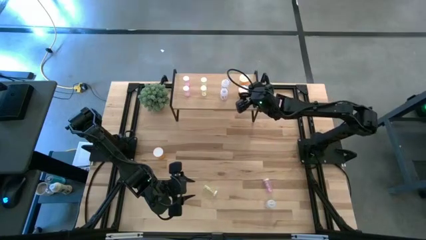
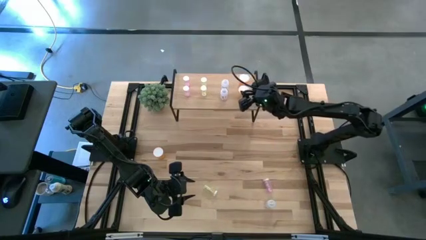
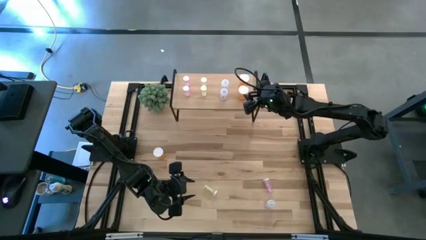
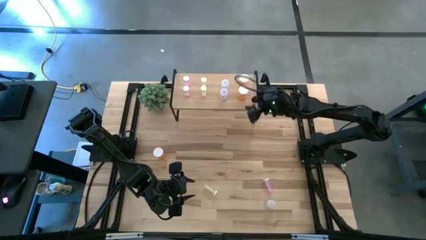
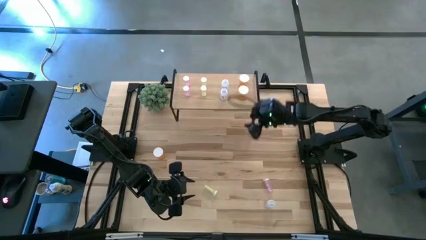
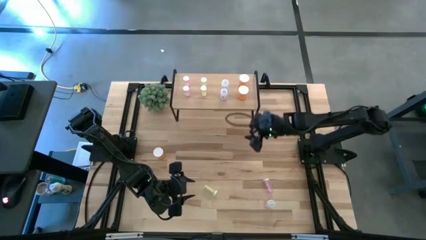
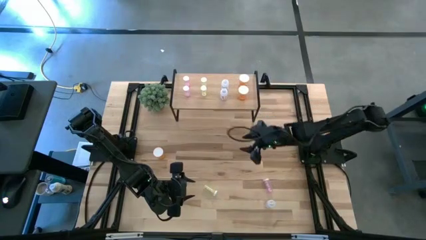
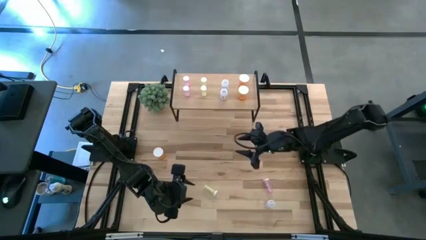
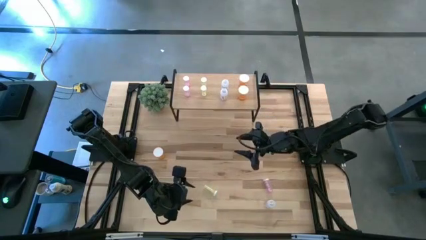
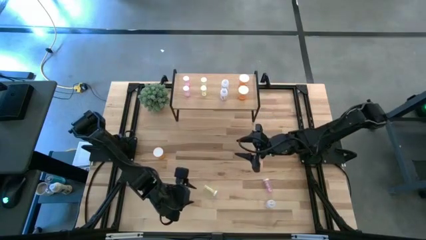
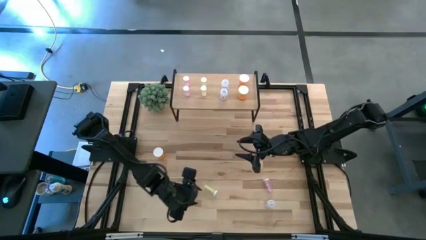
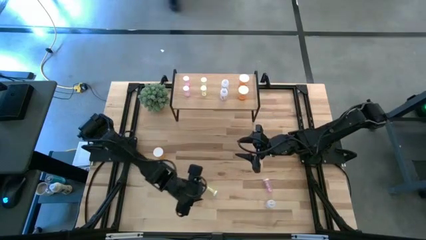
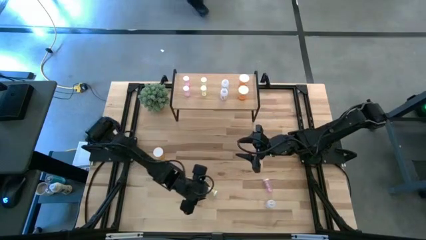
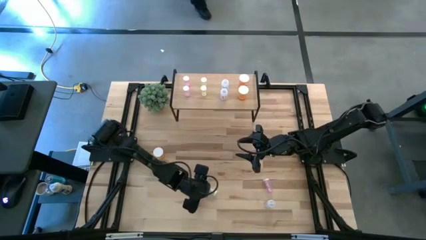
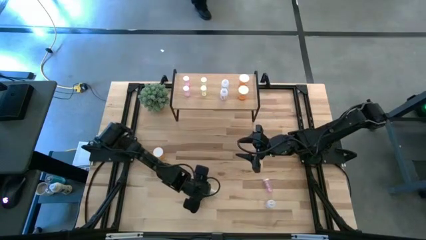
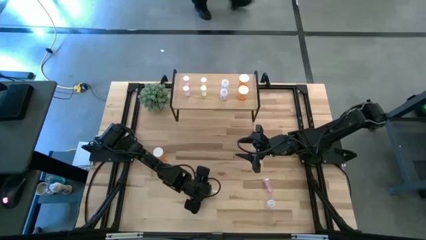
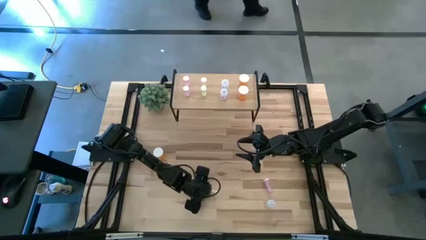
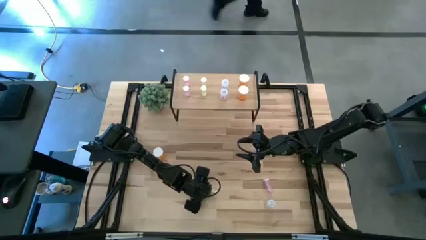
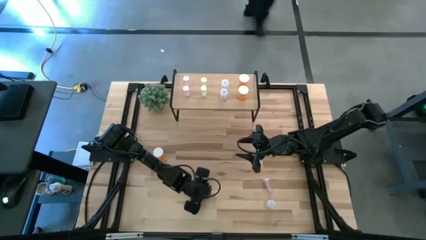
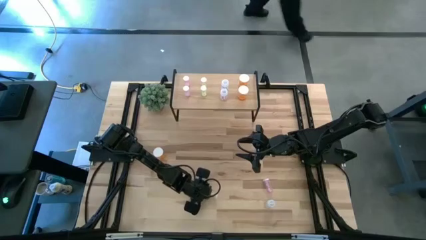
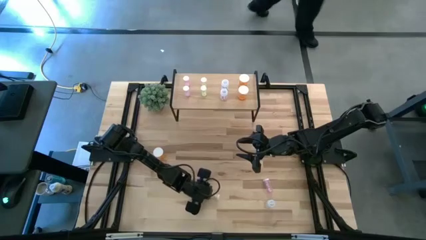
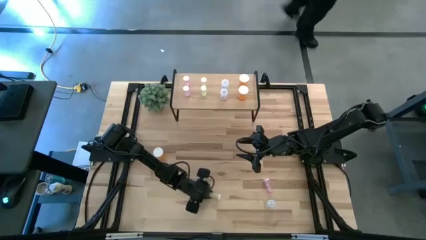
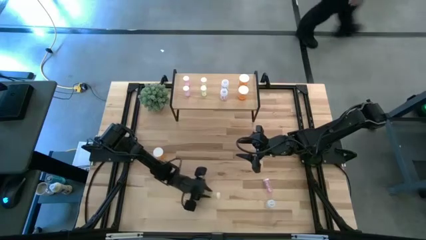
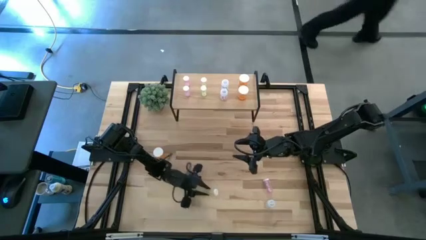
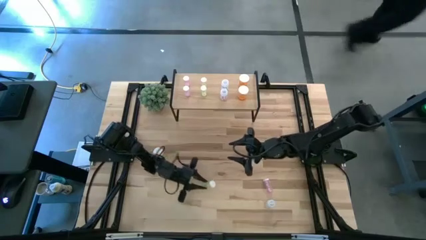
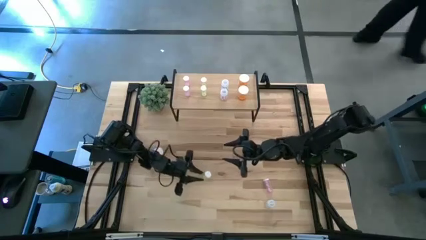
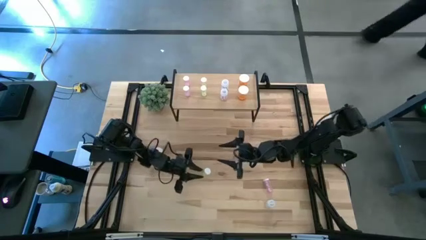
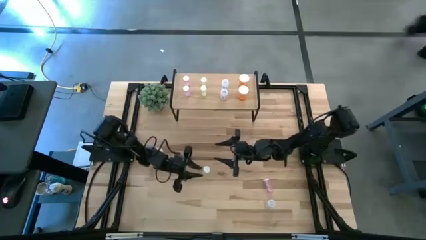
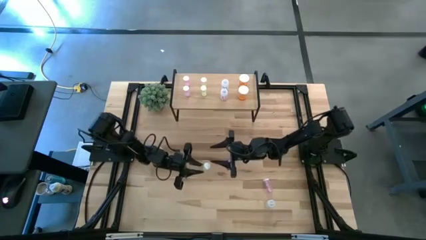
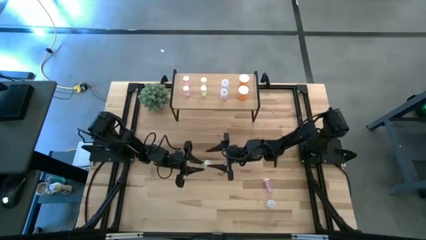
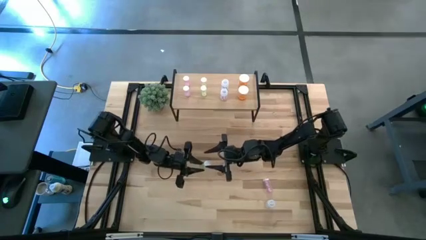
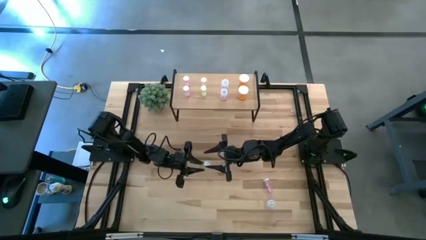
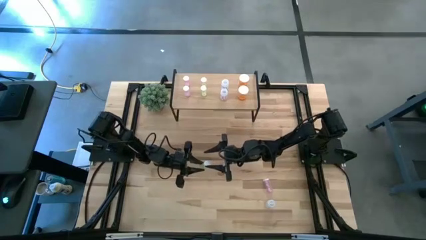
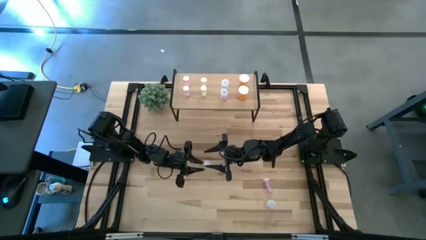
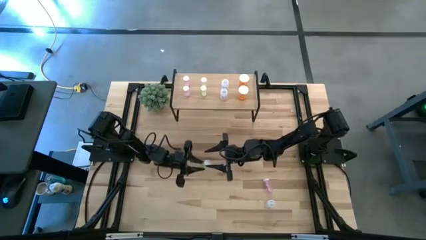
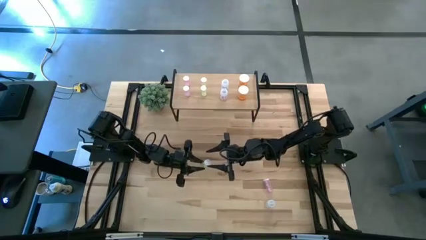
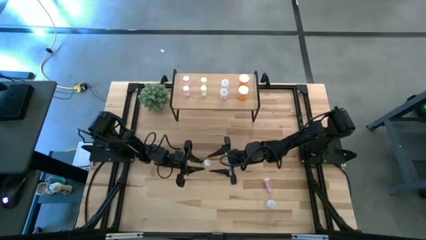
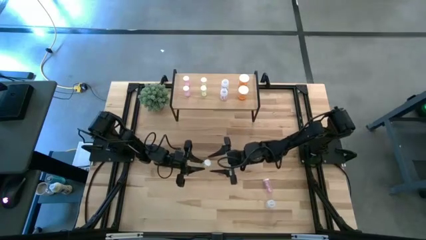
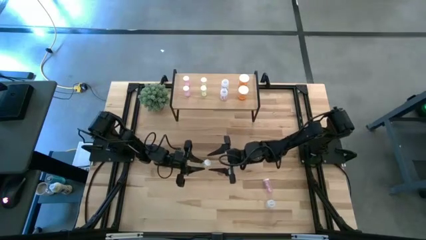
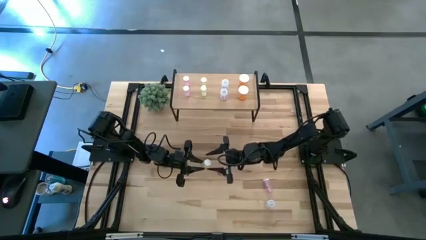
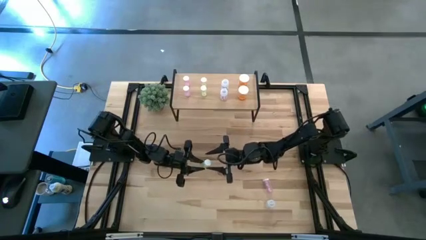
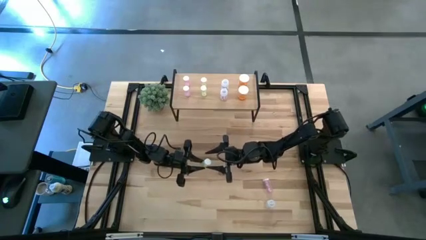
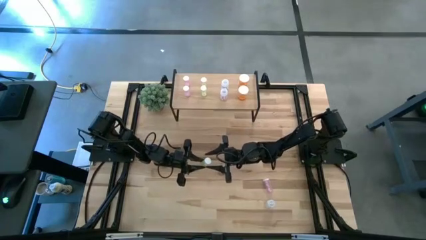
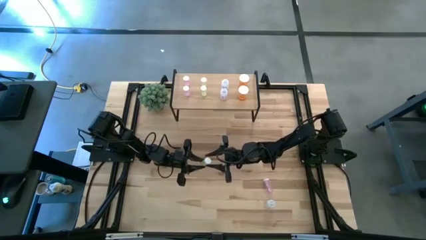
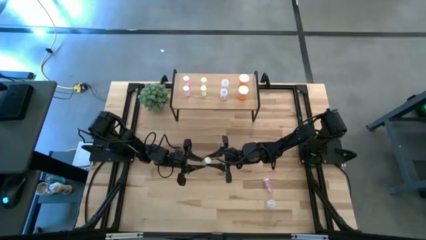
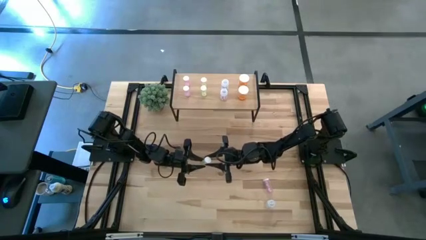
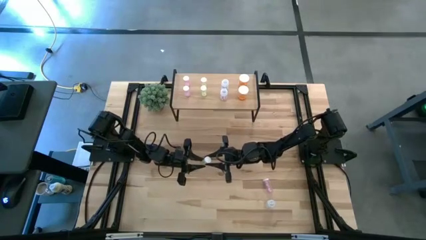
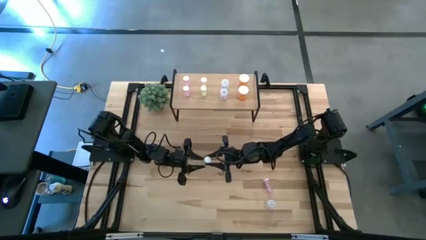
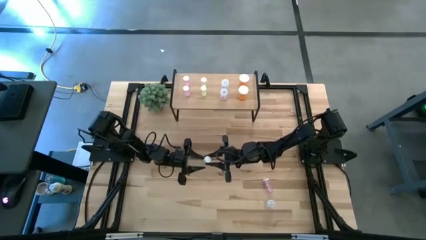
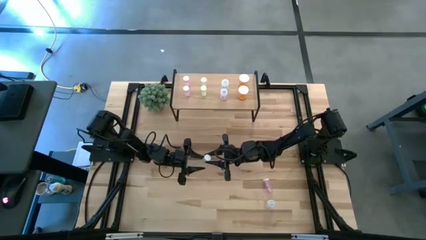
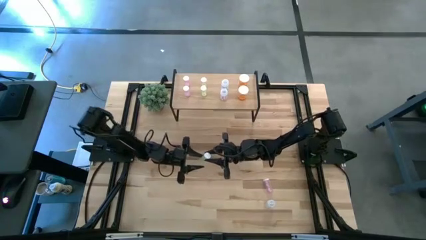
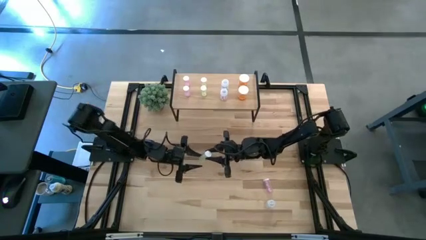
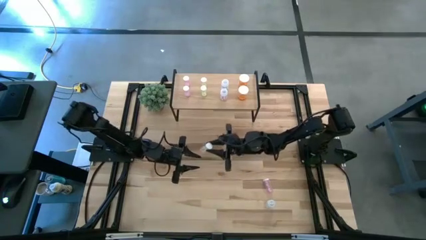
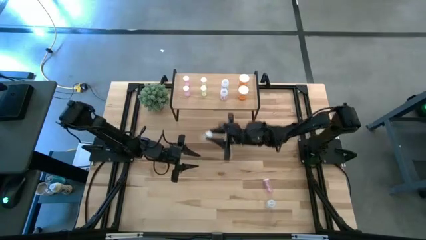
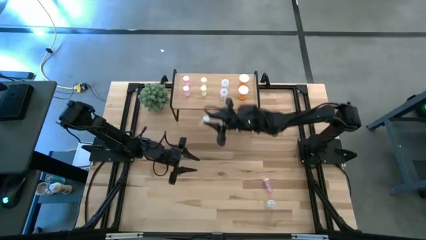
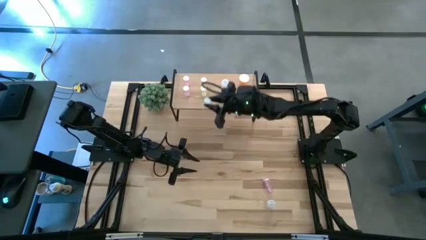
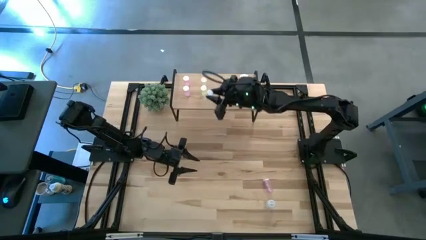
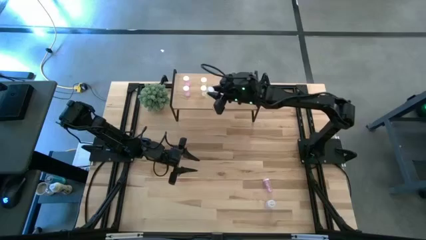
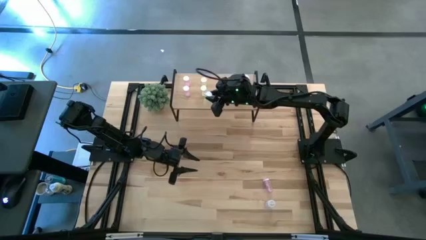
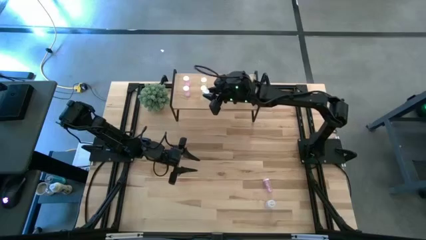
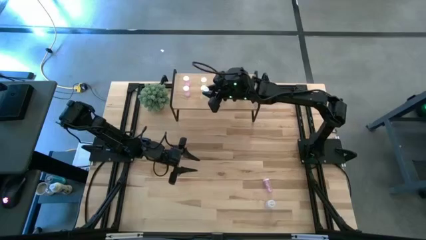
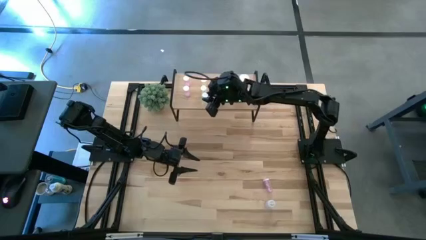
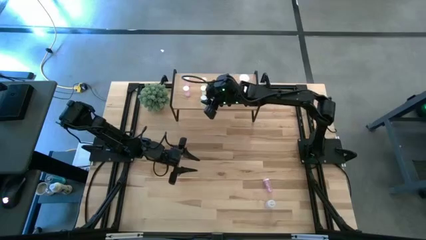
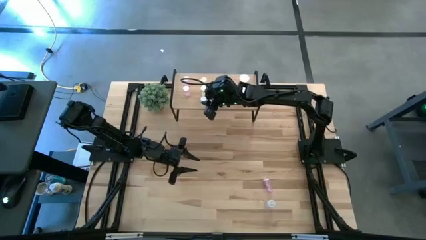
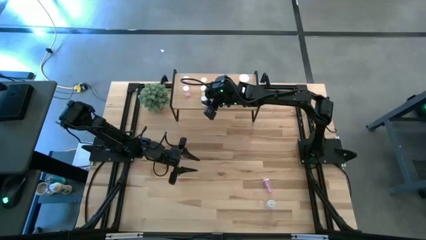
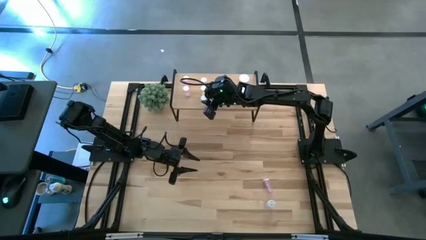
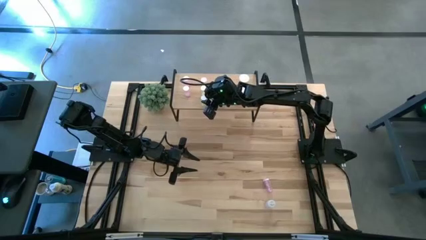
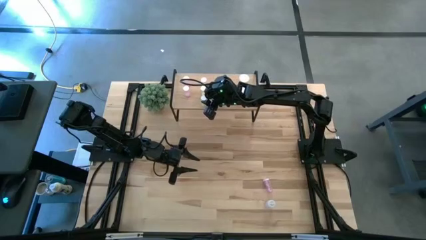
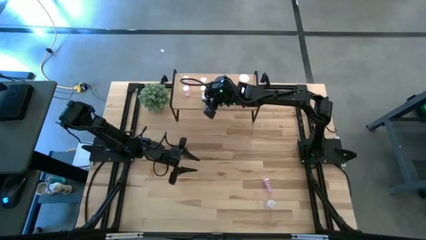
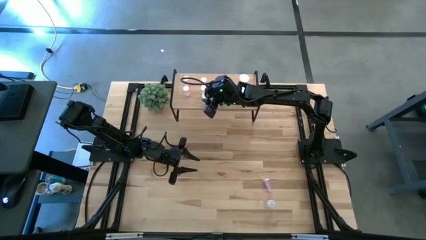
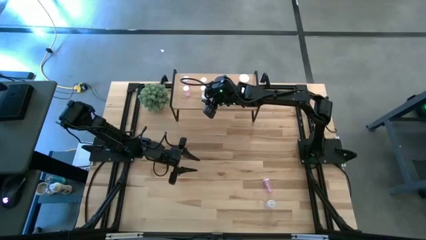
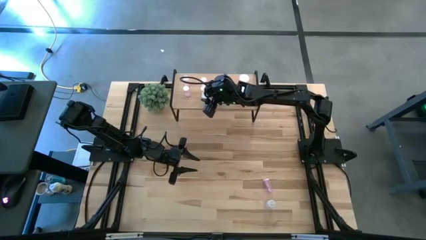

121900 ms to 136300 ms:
Task: Pick and place medicine bottles onto shelf by color
Put the yellow pill bottle aligned with the other yellow pill bottles on the shelf

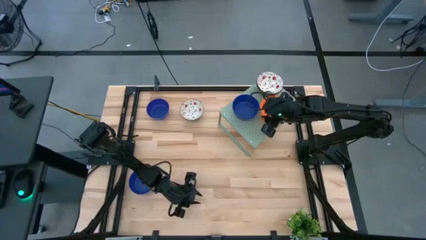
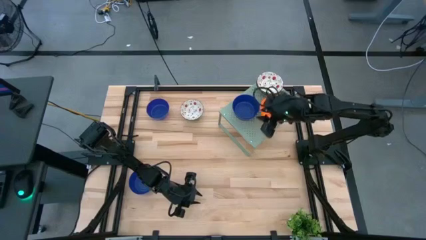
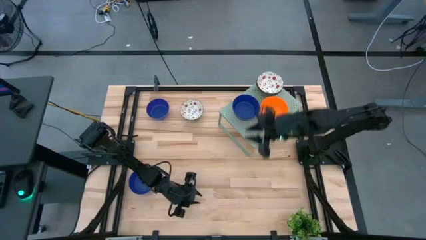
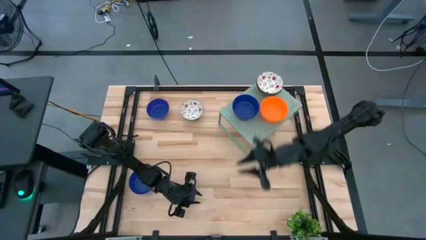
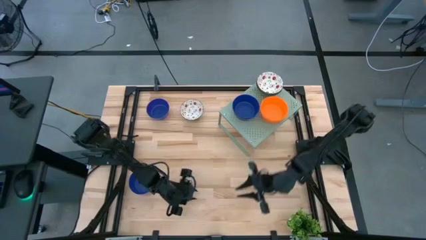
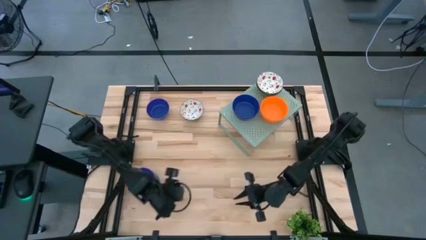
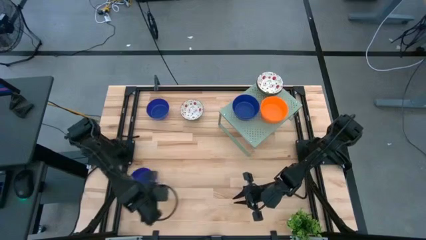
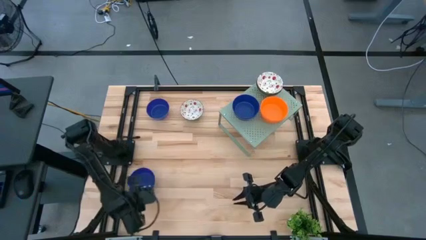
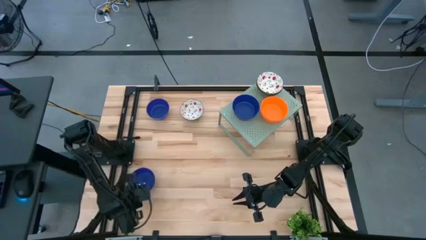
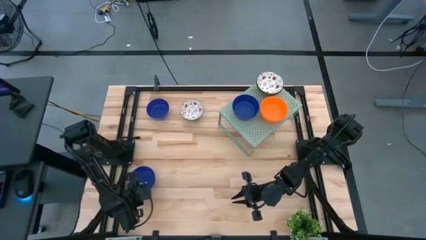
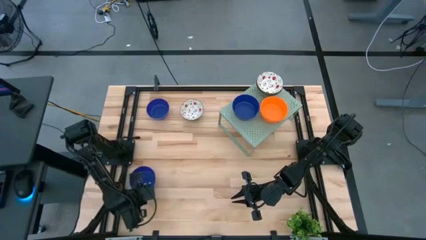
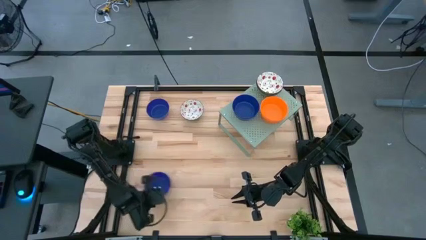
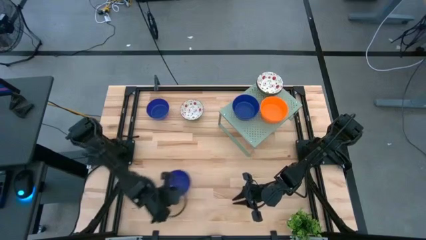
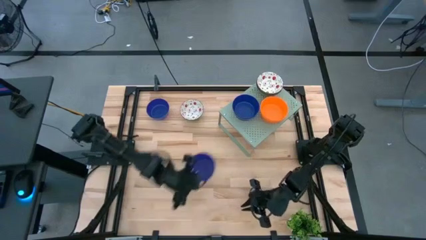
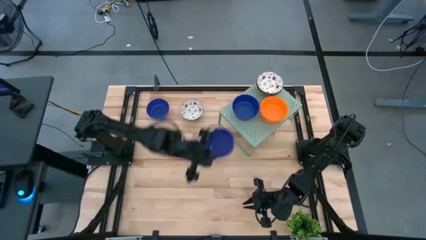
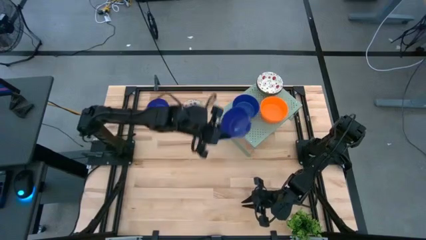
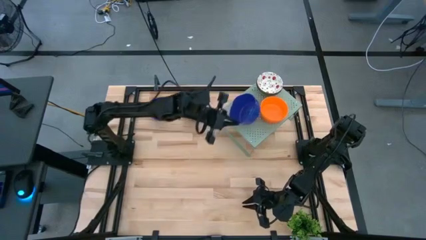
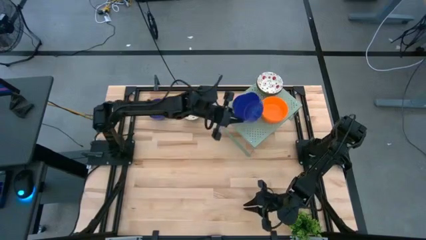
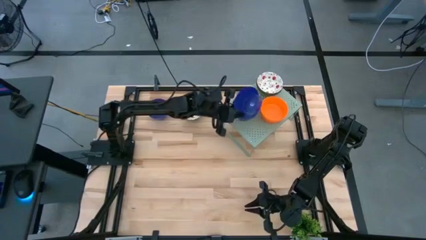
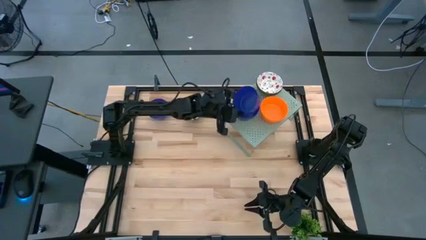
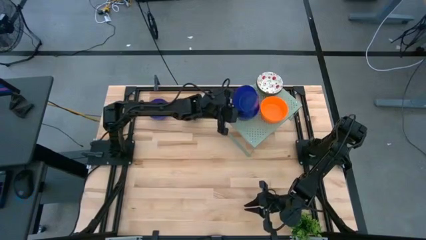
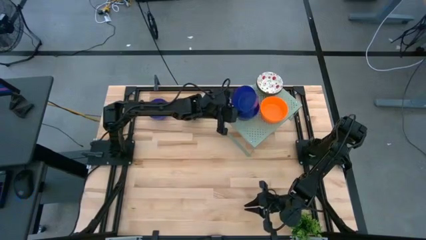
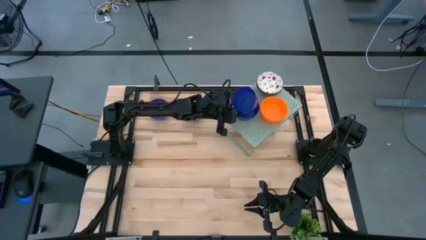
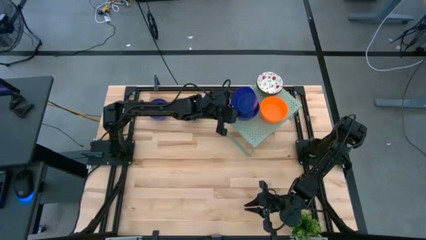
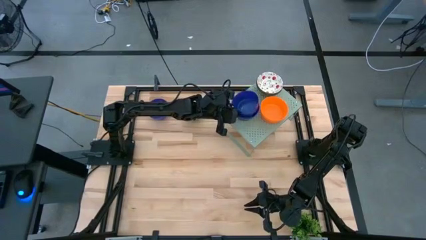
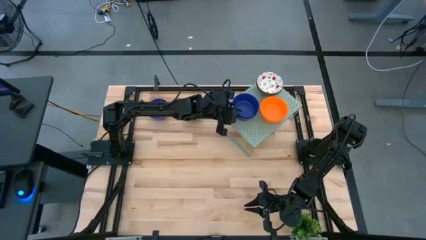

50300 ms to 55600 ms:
Task: Pick & Place Mini bowls
Stack the blue bowl on the blue bowl on the shelf
